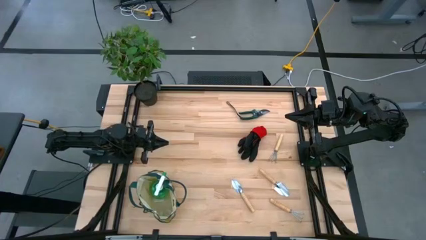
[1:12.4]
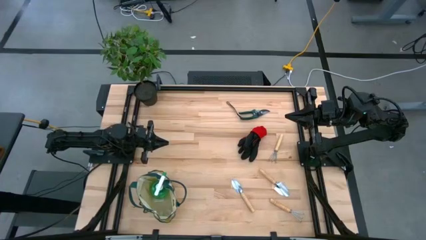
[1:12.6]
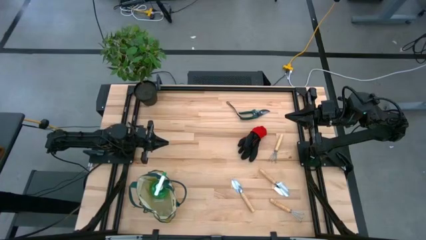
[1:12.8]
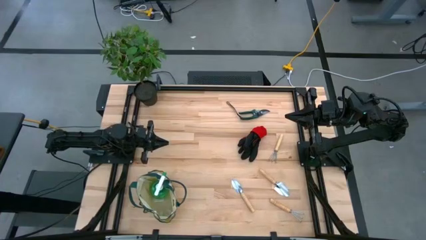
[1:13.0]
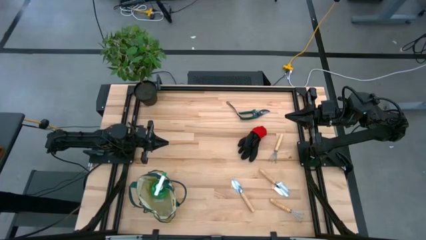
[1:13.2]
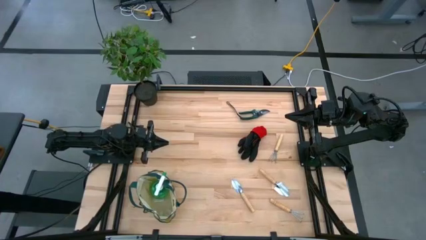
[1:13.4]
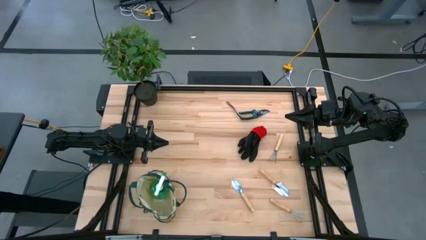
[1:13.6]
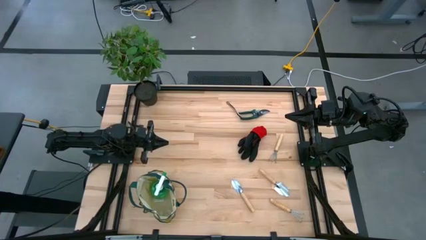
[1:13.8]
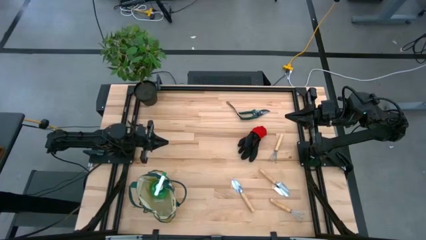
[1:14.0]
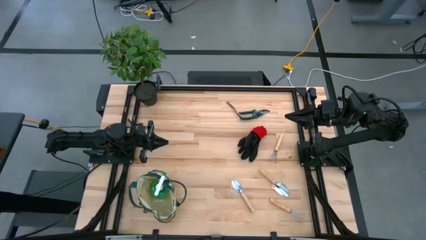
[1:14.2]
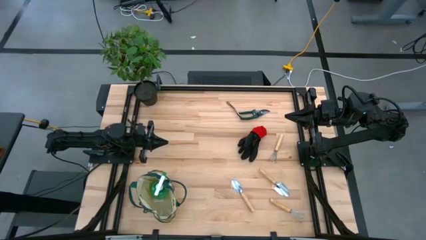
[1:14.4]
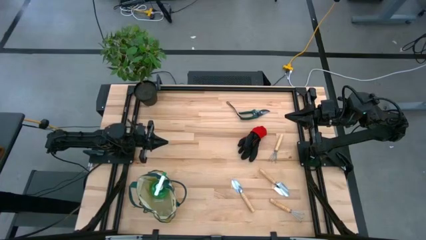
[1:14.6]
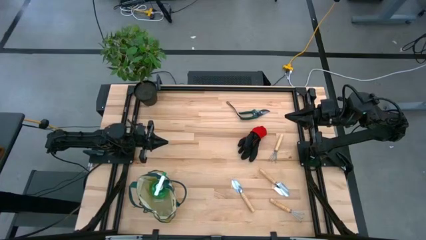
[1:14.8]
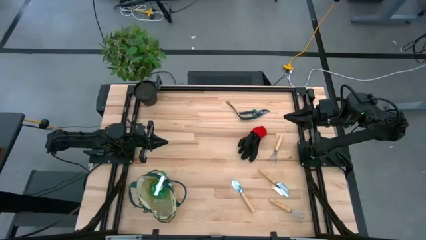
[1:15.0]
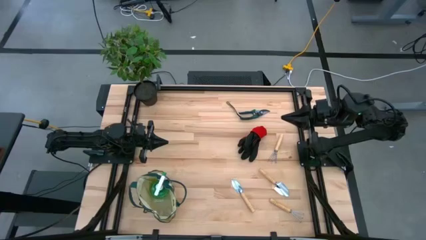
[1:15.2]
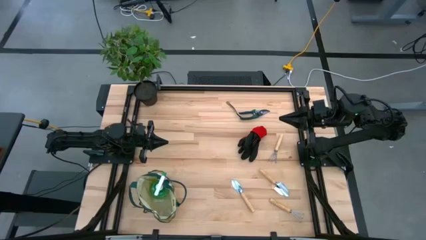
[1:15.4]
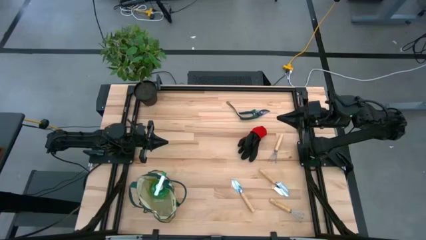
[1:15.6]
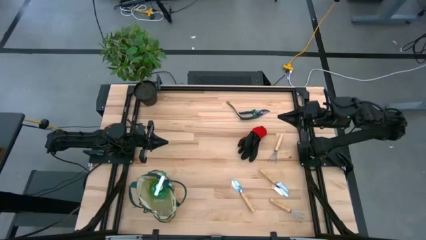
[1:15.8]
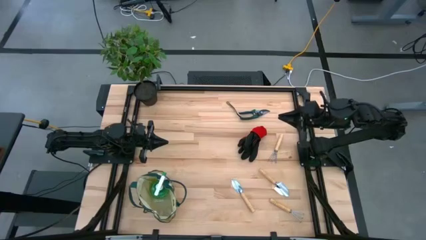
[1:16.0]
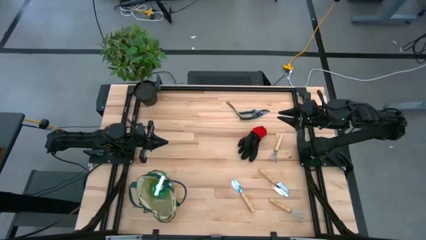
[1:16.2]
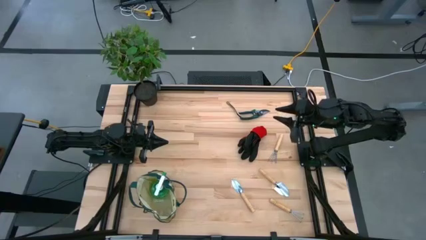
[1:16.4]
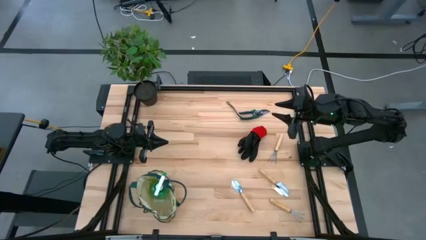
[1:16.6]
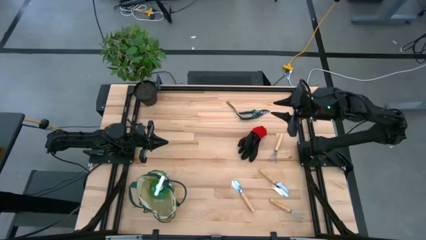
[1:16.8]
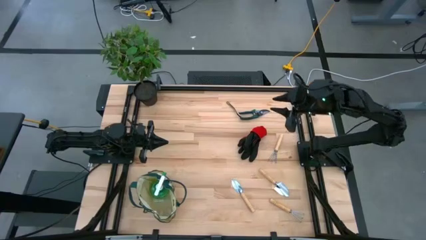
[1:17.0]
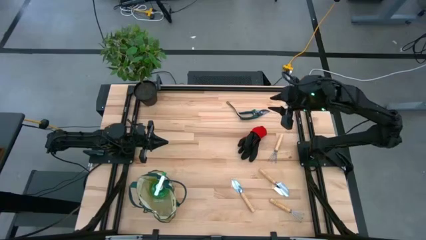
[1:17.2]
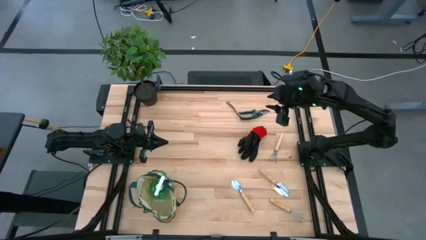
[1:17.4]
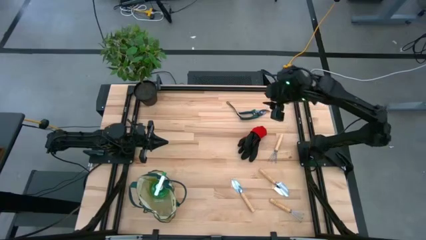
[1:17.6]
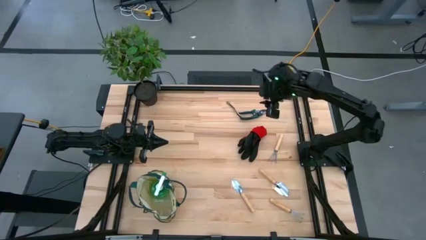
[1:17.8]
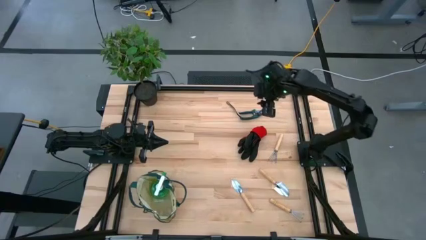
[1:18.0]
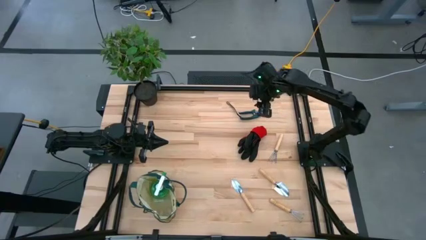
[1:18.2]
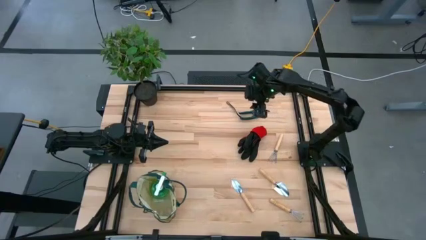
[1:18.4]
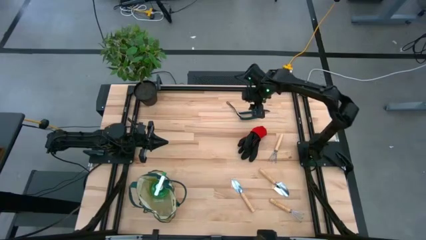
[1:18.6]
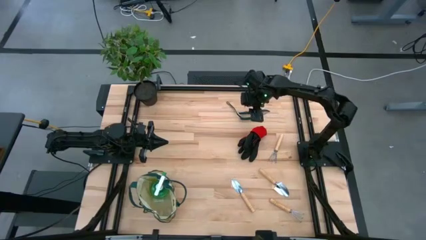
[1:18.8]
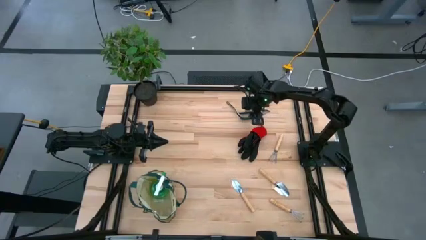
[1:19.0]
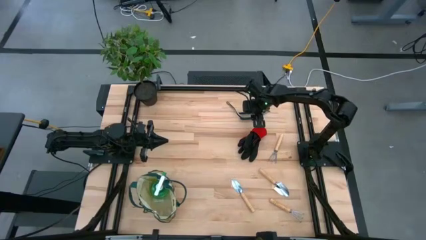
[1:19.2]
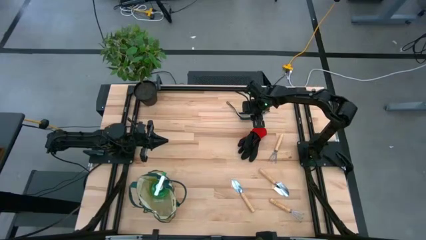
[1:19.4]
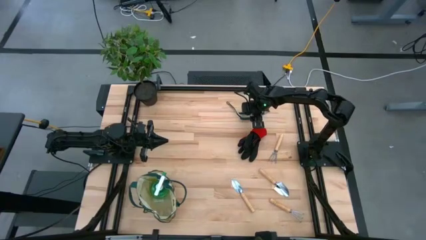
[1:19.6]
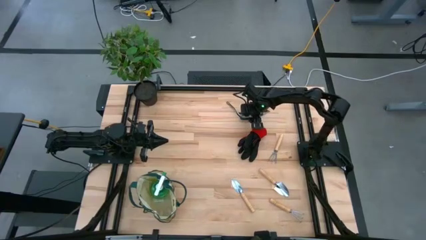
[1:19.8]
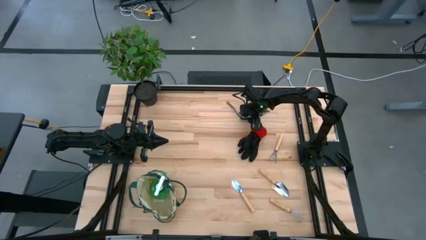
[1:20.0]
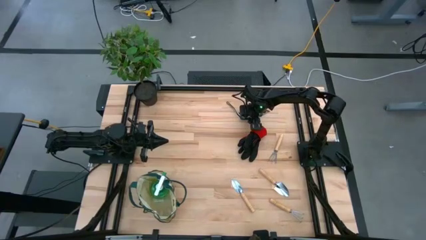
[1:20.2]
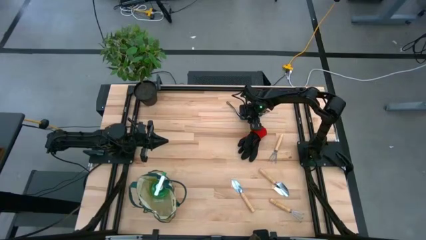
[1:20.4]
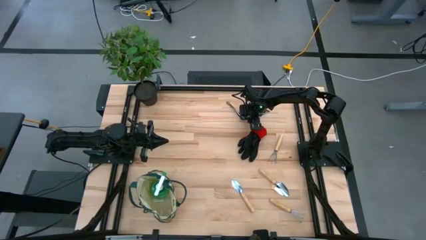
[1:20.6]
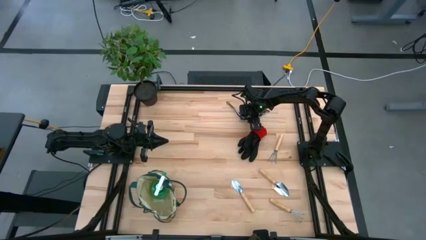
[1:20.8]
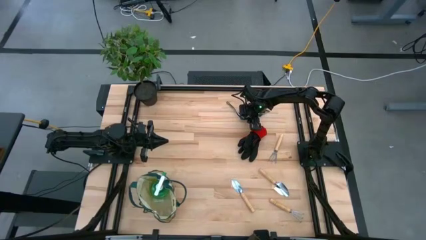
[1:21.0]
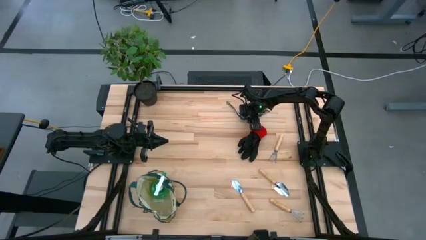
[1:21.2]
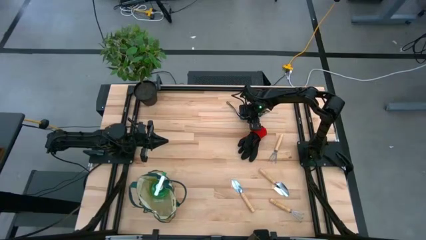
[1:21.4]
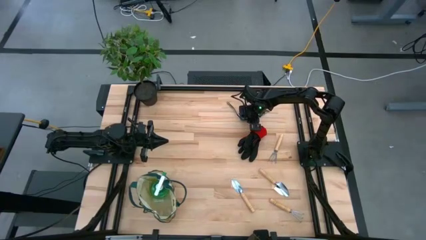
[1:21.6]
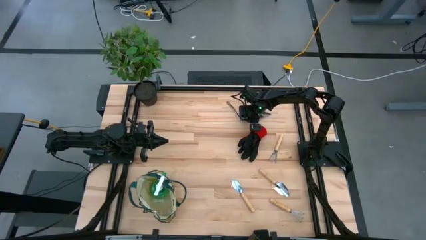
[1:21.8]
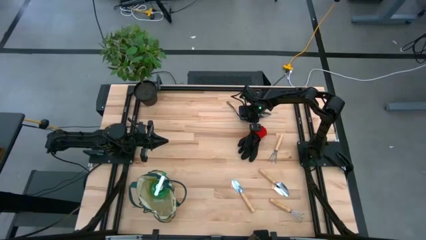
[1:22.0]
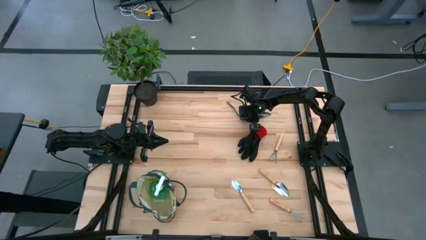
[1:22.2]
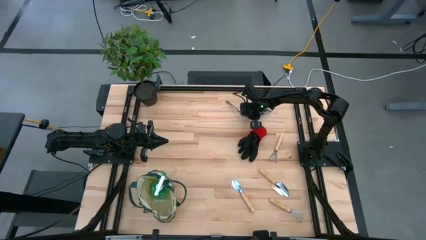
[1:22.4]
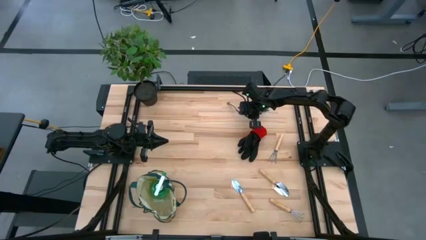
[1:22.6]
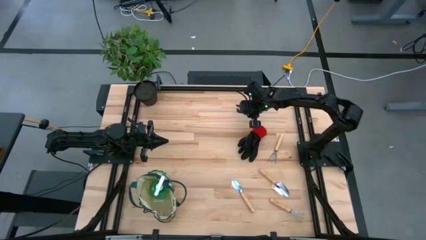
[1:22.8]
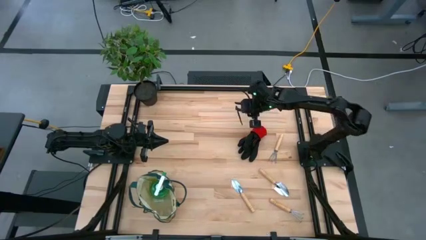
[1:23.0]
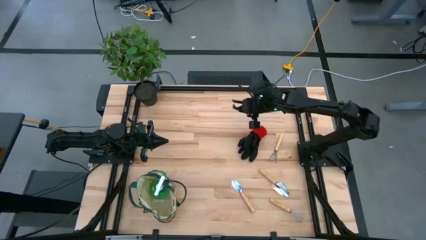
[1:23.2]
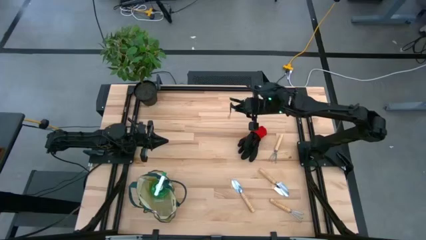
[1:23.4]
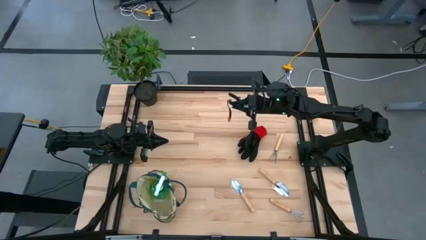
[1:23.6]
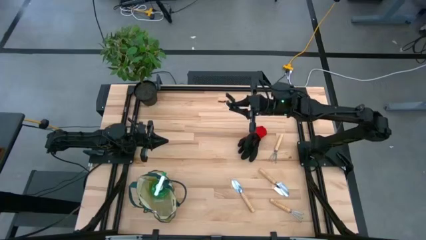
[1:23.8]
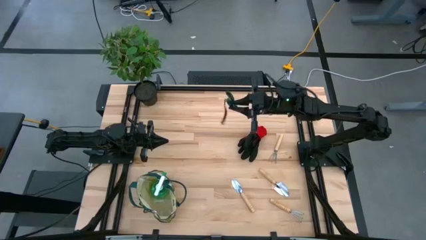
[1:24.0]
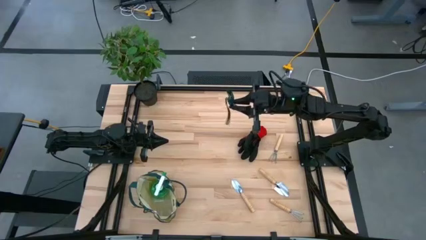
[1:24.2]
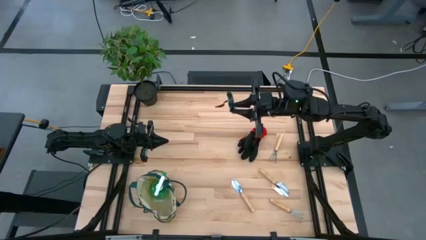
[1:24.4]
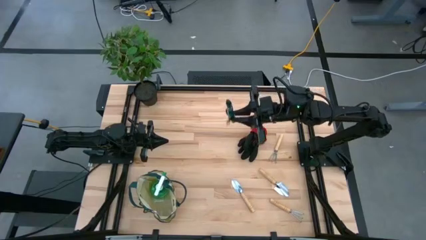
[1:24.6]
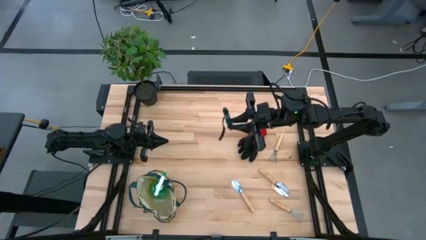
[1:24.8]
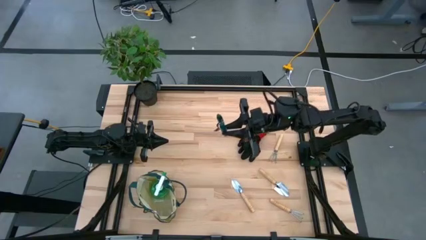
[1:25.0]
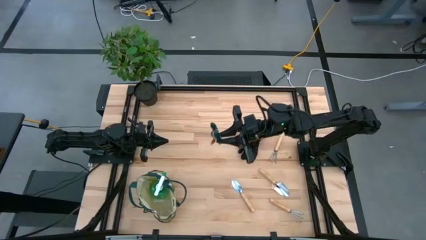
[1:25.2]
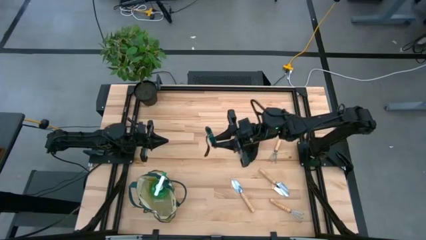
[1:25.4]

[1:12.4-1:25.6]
Task: Pick & Place Garden tools in Gardening bag
Put the shear scissors into the gardening bag
